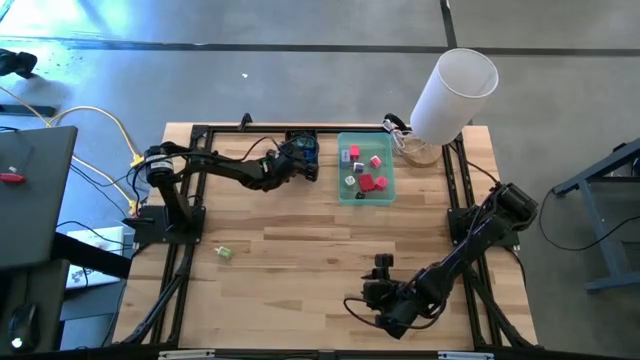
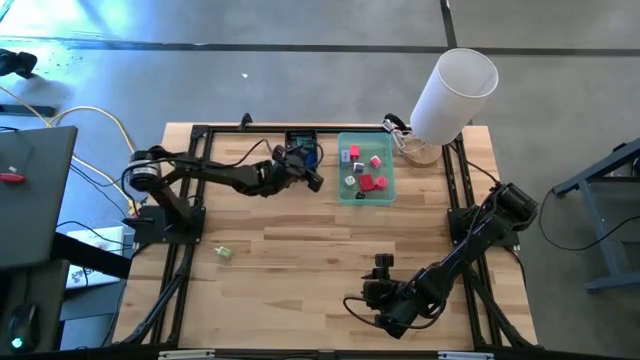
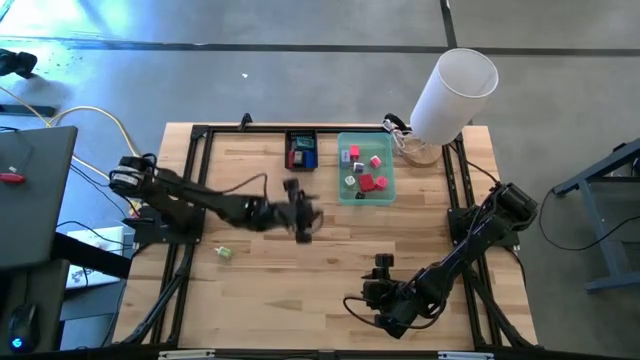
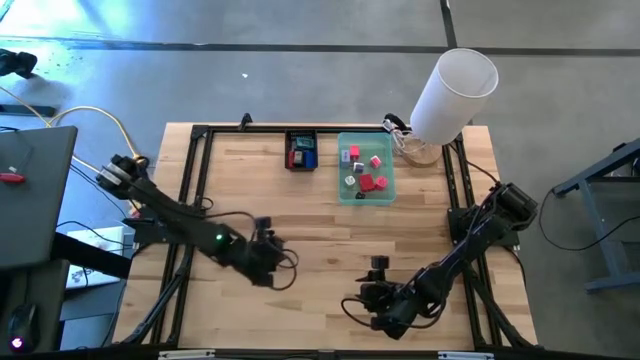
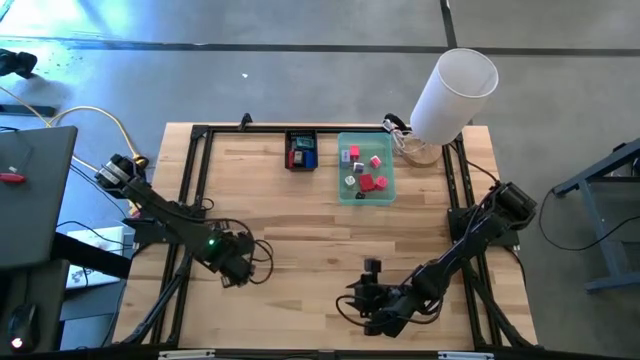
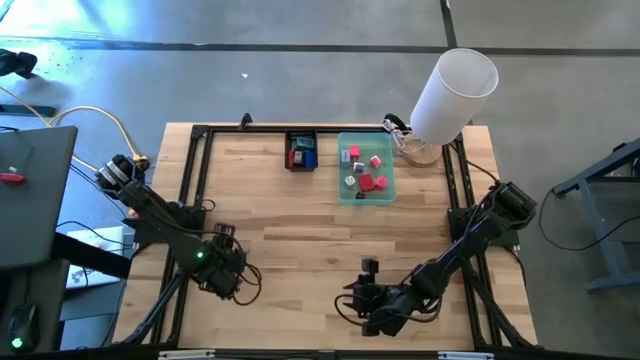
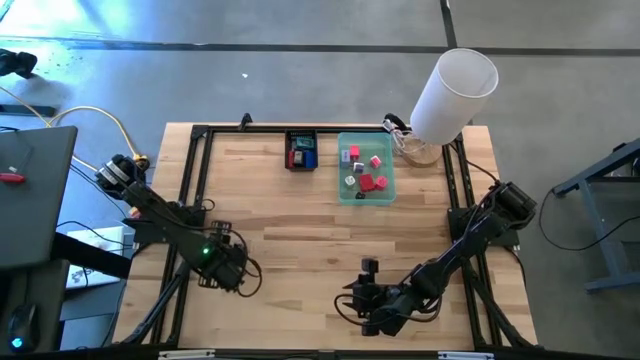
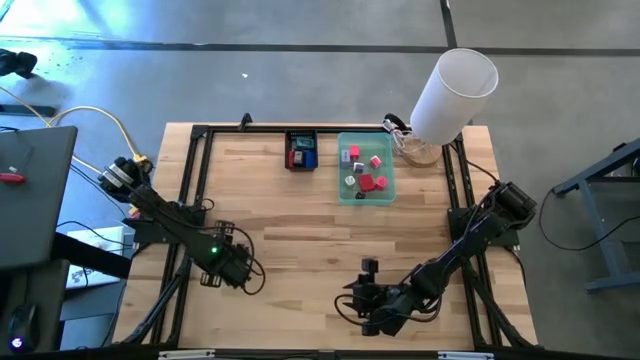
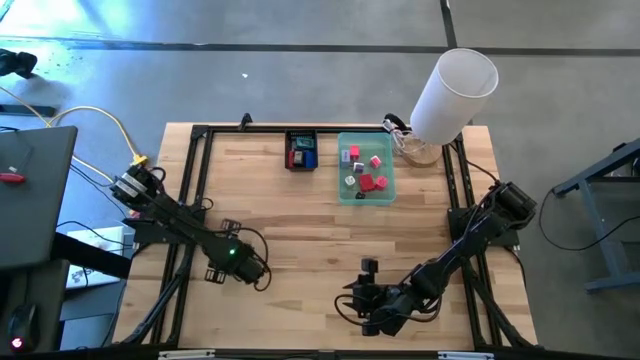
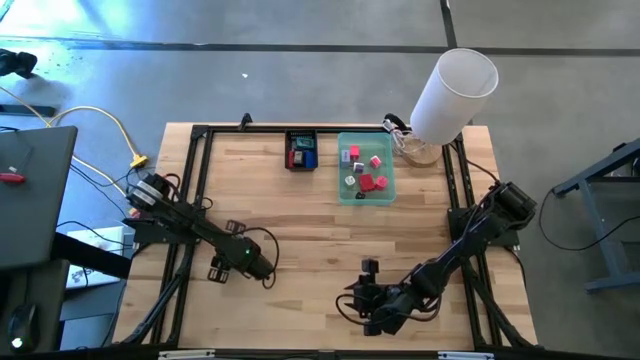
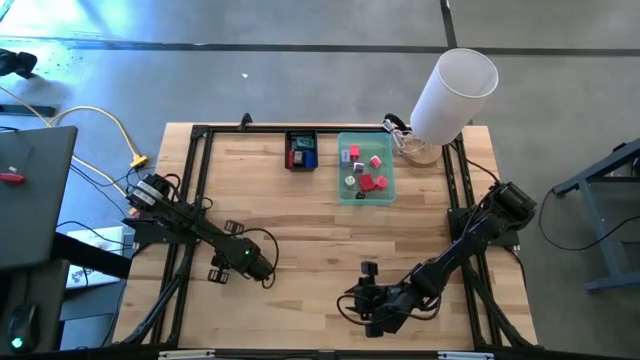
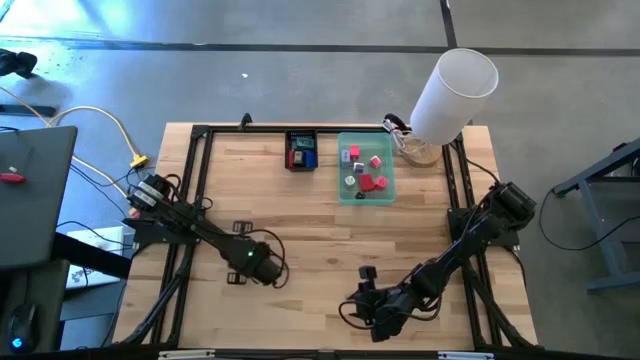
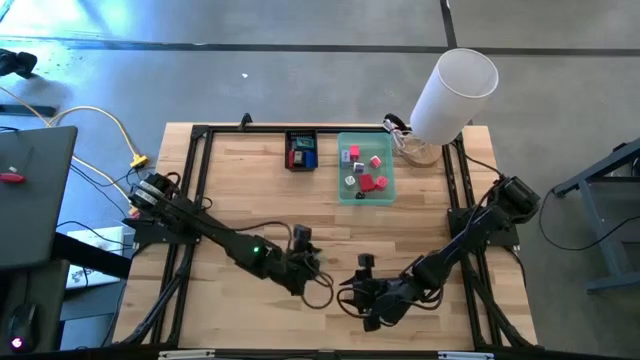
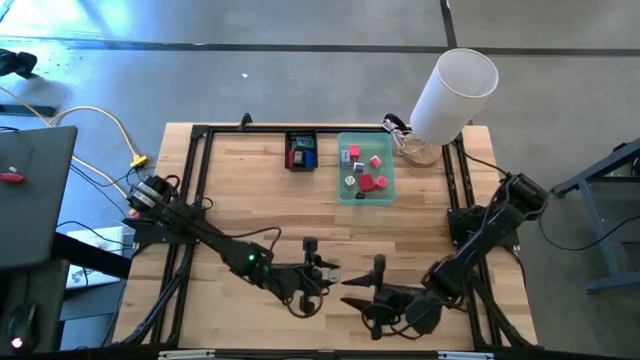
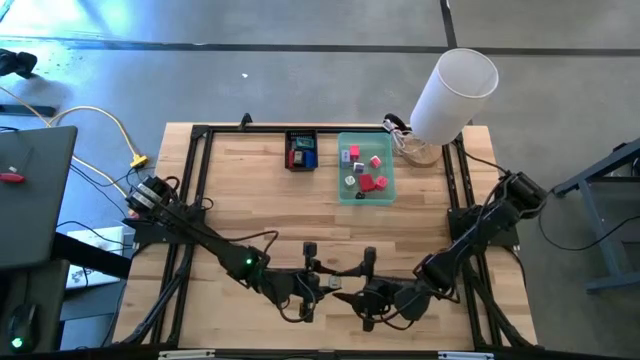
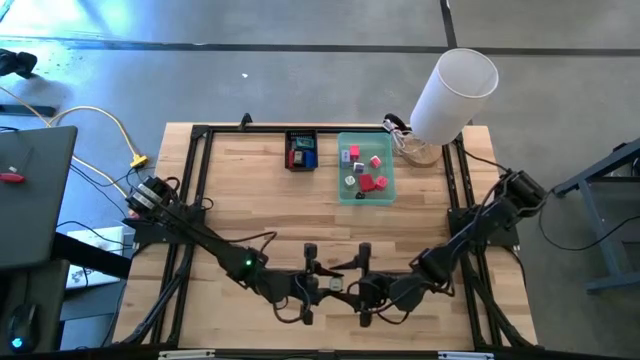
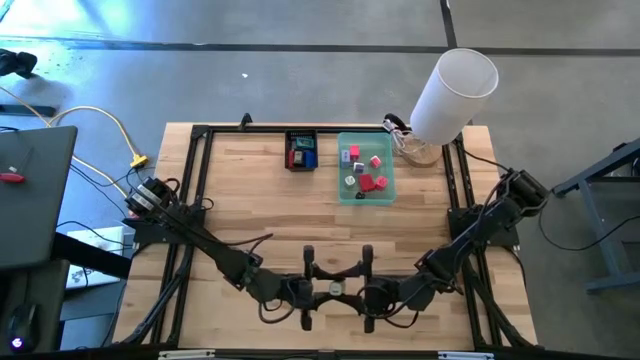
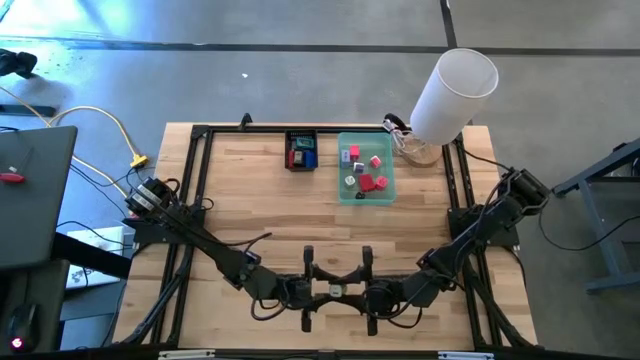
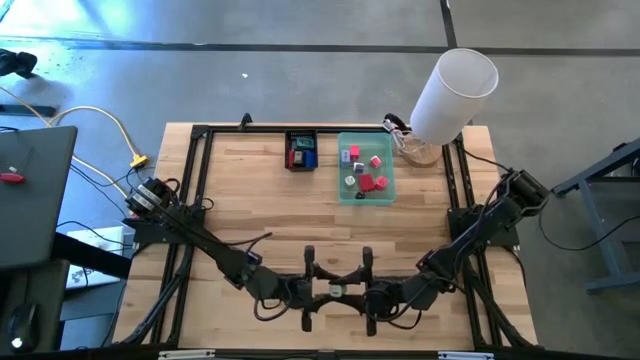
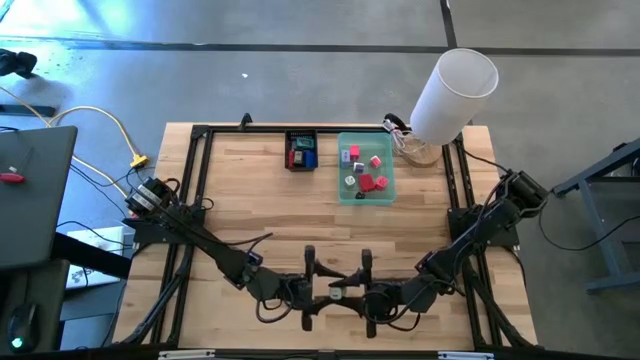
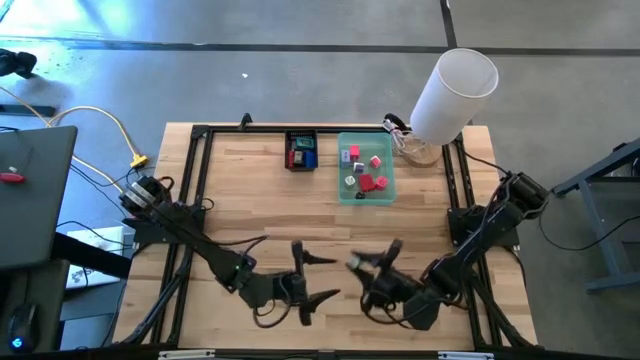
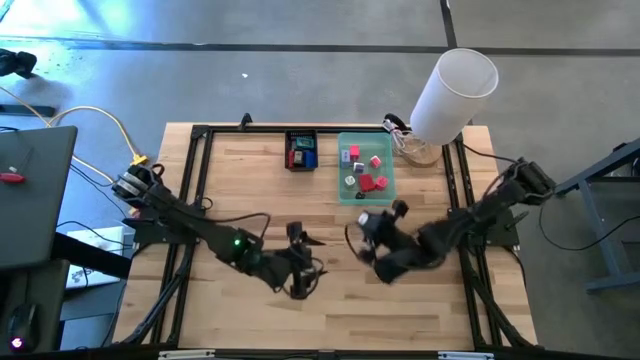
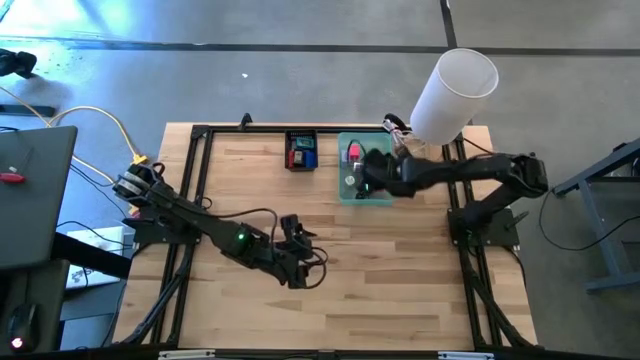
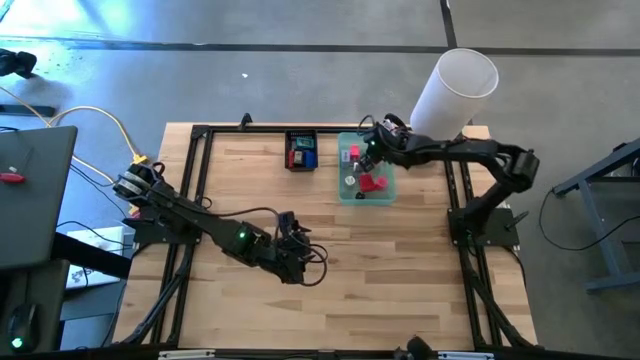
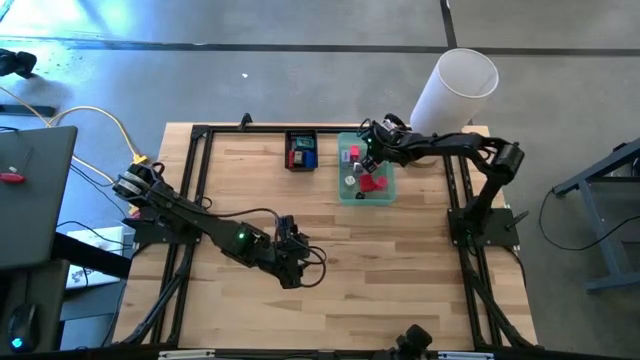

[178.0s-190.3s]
Task: Pick & Place Office items
Put the green charger adapter into the blue bin

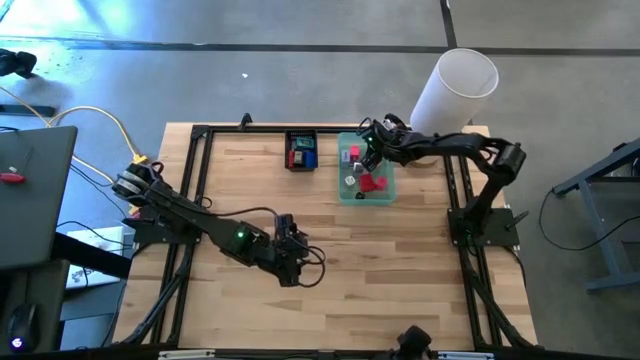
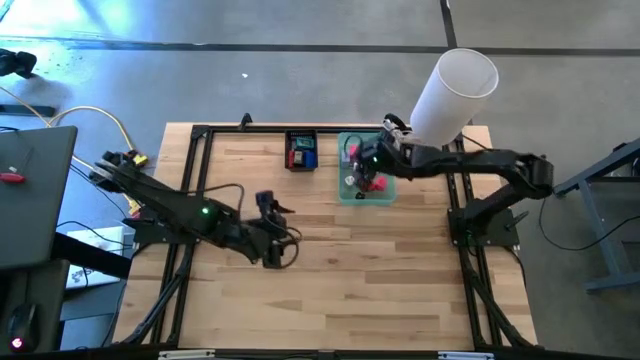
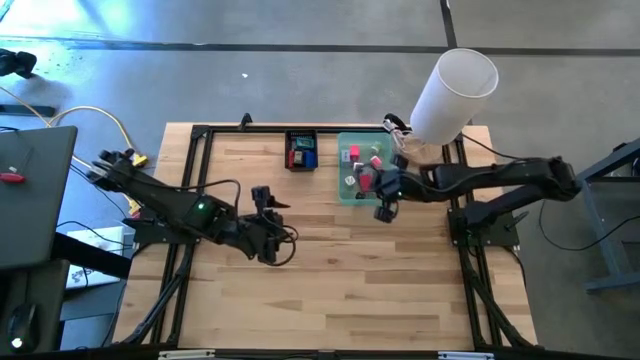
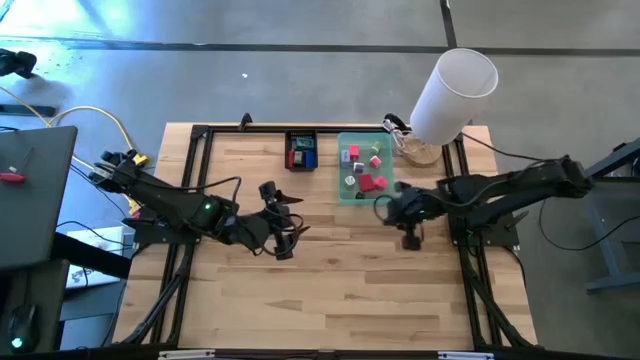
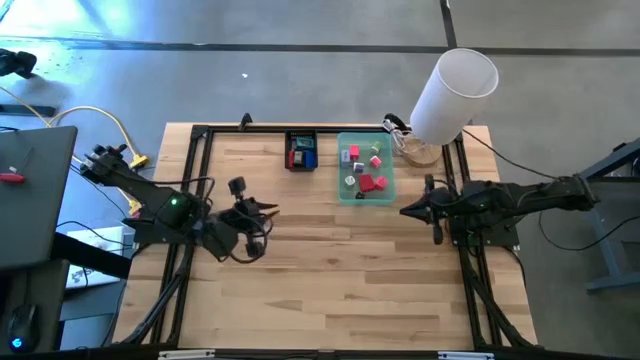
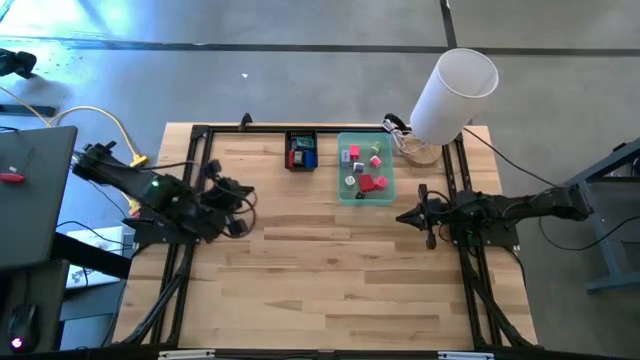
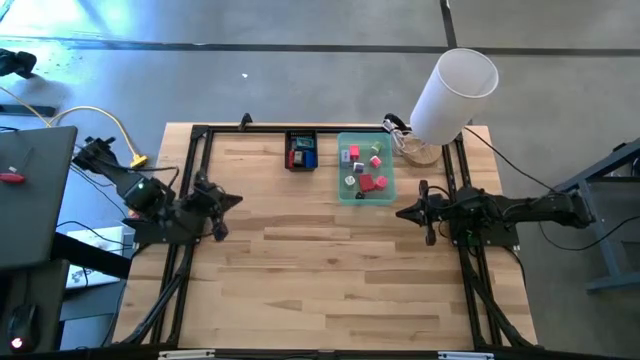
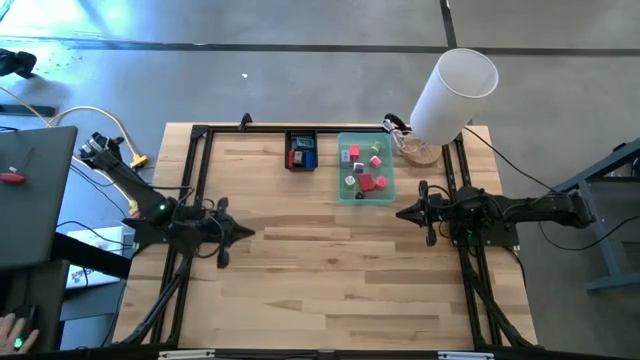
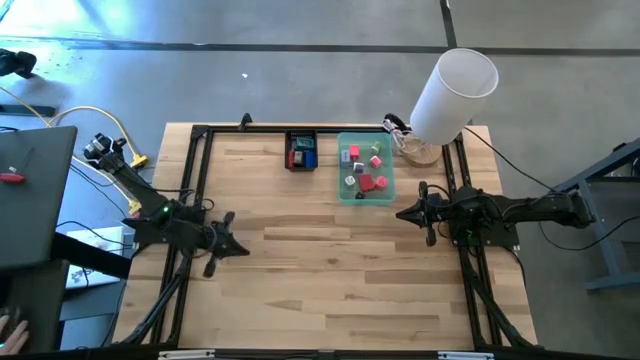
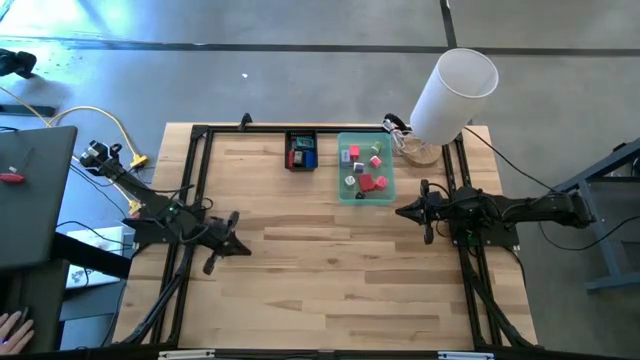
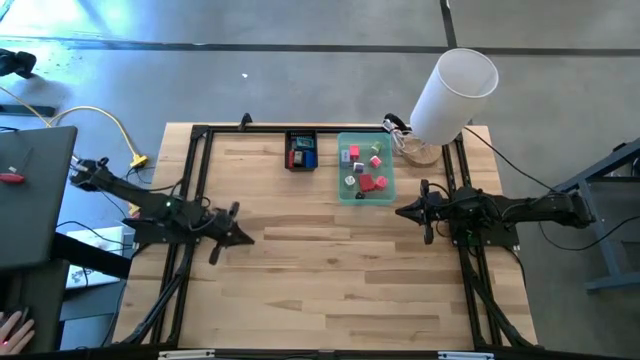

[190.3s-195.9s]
Return to Home Position

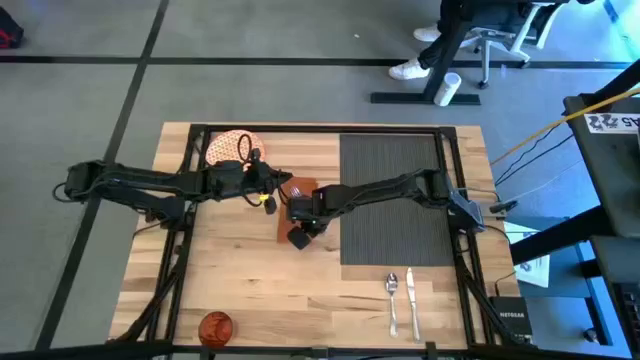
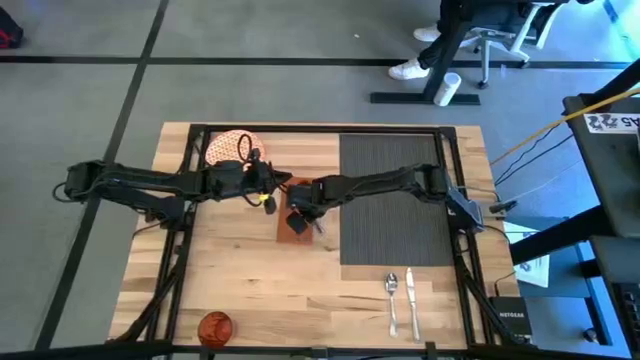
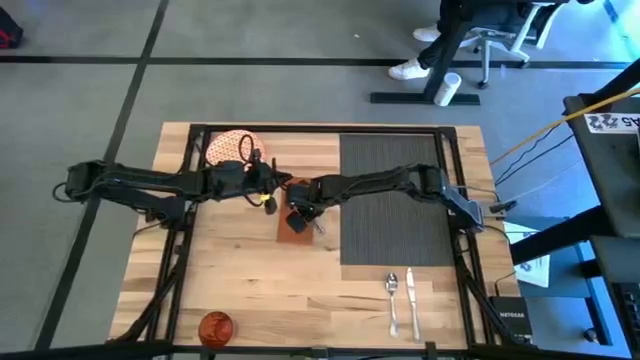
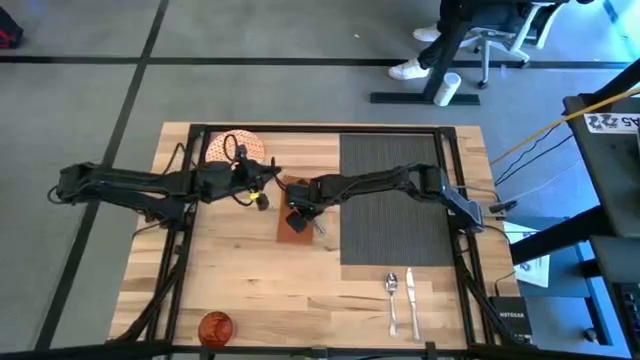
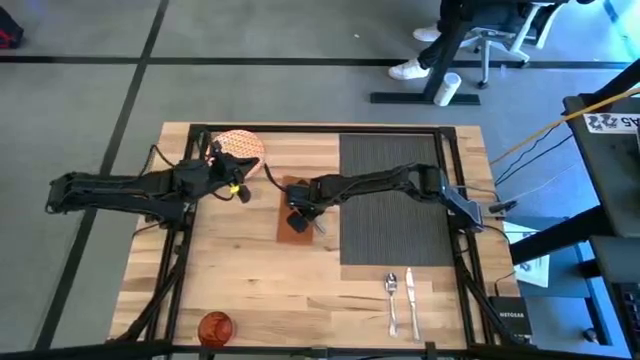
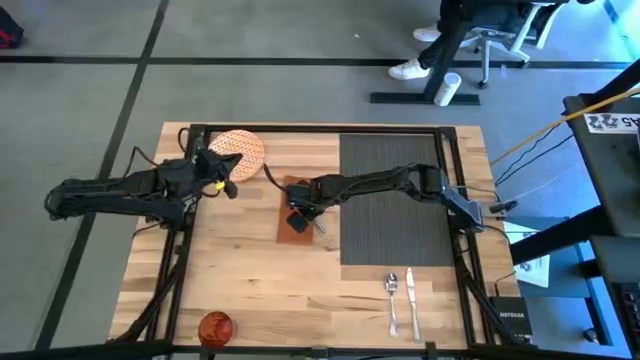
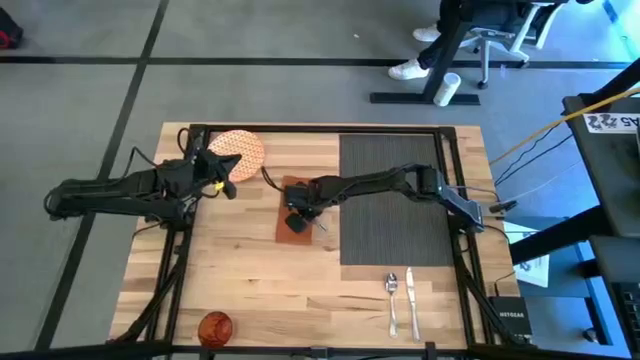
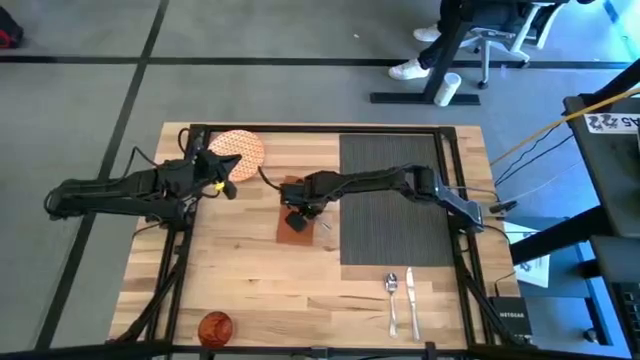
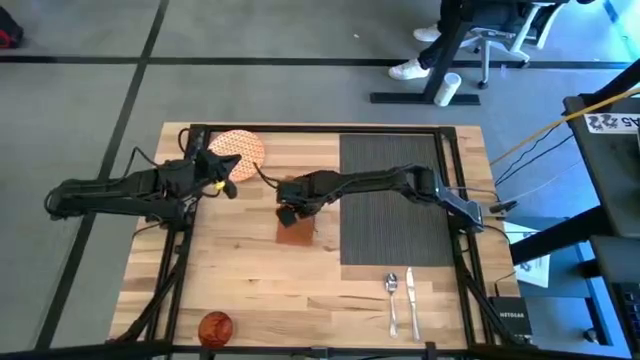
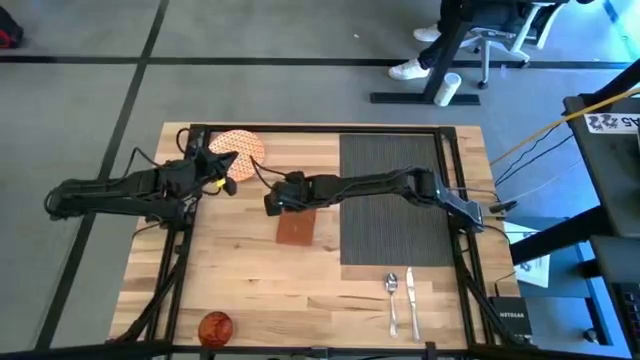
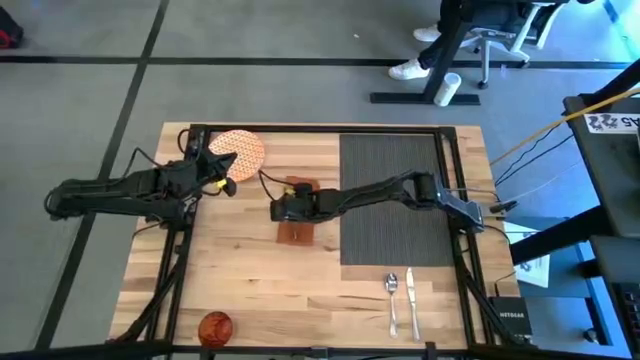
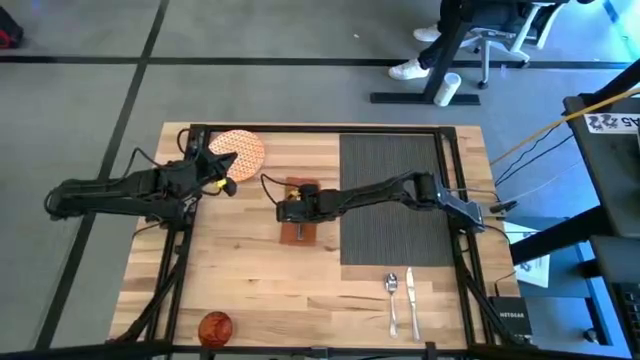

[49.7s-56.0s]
Task: Set table place
Put the silver fork on top of the orange table napkin
